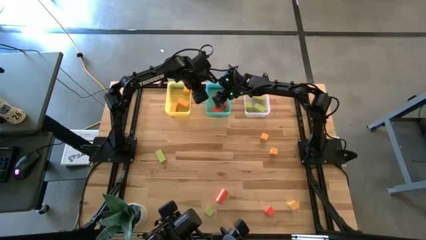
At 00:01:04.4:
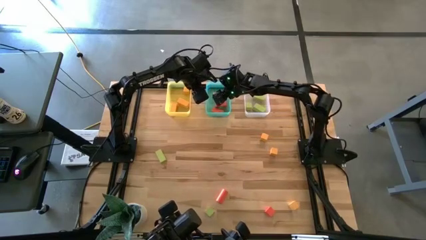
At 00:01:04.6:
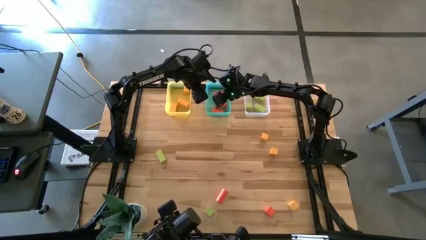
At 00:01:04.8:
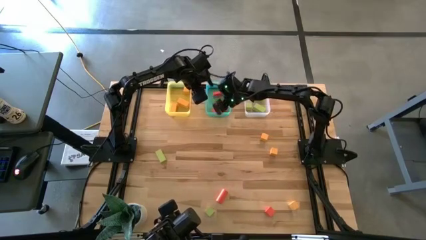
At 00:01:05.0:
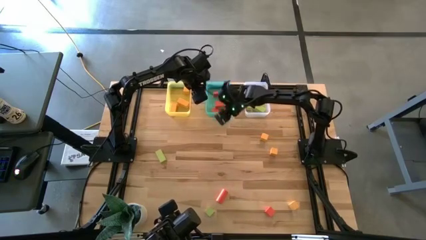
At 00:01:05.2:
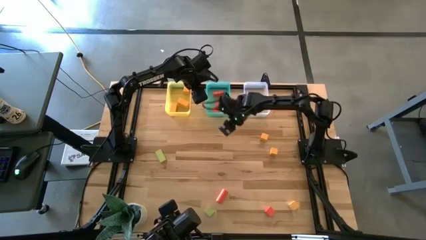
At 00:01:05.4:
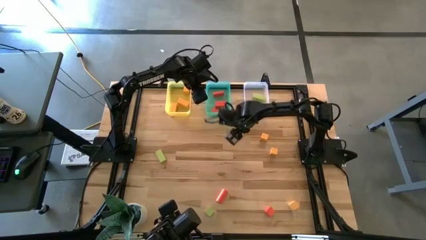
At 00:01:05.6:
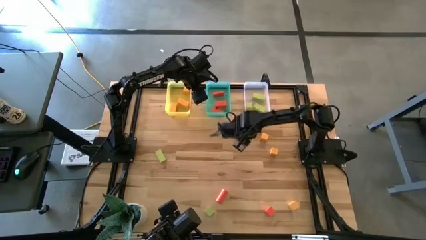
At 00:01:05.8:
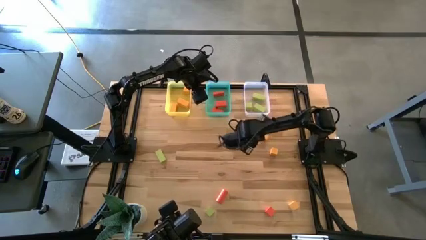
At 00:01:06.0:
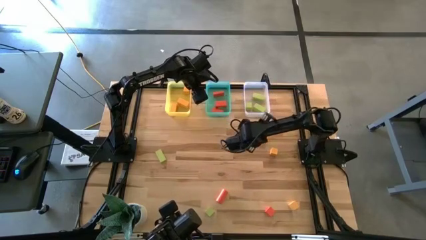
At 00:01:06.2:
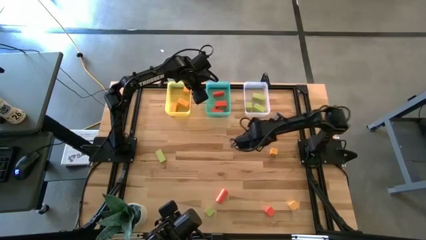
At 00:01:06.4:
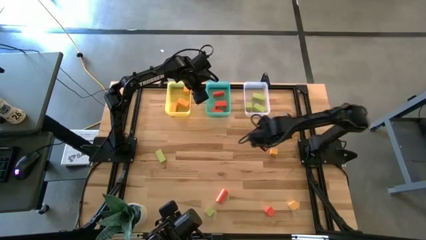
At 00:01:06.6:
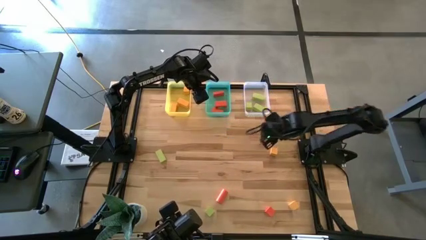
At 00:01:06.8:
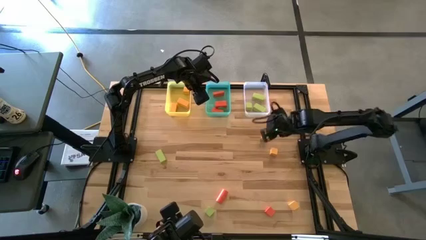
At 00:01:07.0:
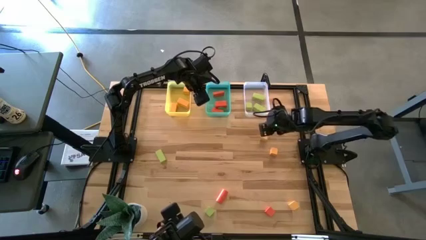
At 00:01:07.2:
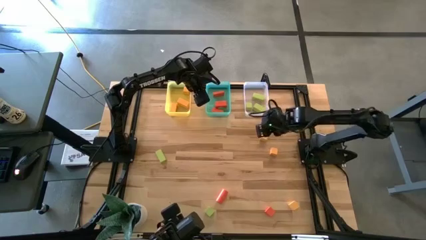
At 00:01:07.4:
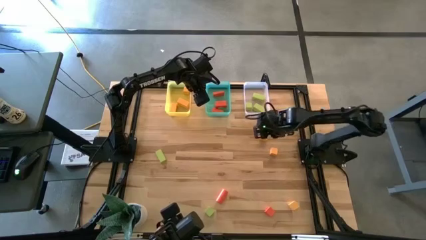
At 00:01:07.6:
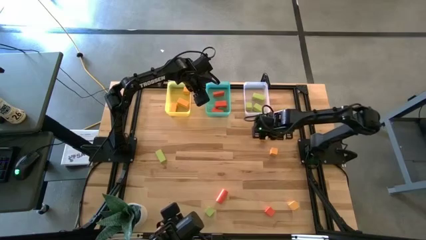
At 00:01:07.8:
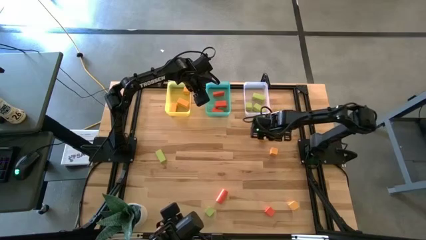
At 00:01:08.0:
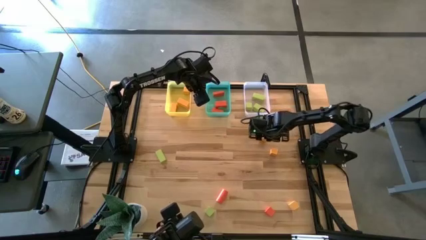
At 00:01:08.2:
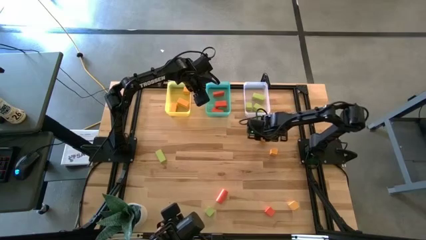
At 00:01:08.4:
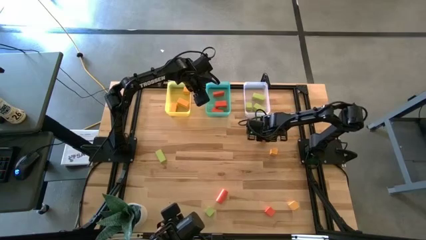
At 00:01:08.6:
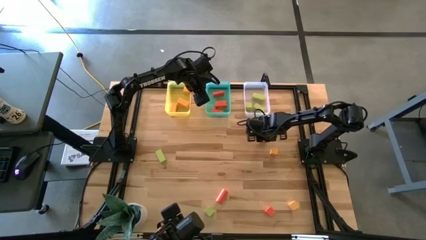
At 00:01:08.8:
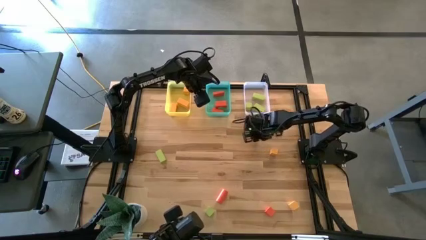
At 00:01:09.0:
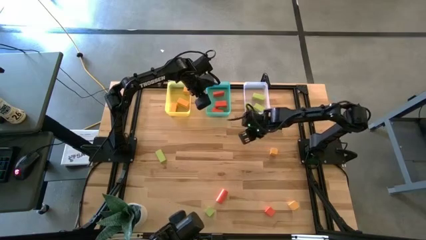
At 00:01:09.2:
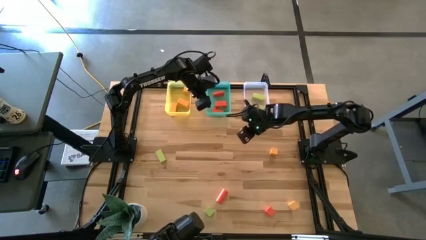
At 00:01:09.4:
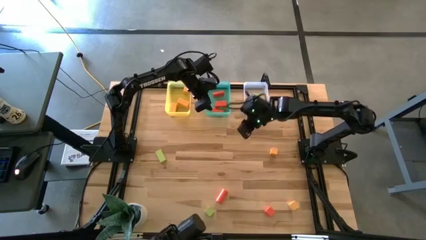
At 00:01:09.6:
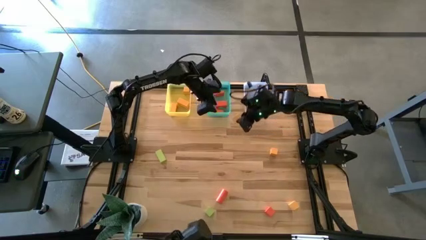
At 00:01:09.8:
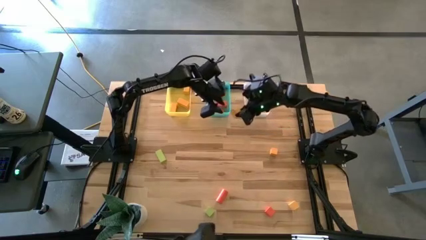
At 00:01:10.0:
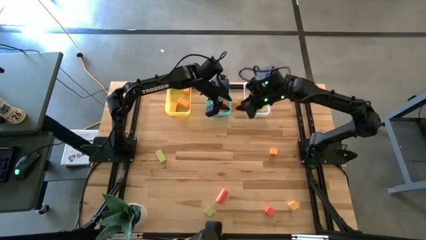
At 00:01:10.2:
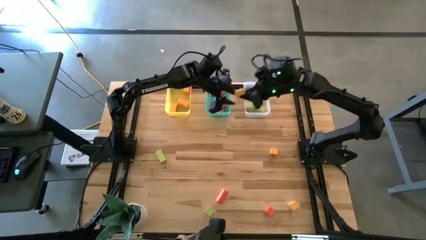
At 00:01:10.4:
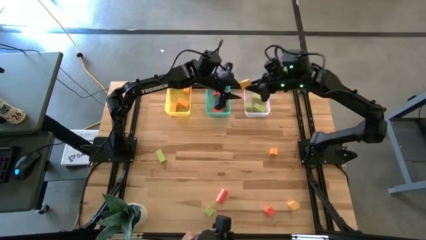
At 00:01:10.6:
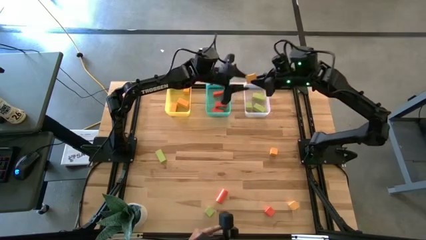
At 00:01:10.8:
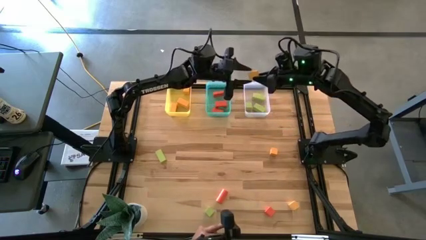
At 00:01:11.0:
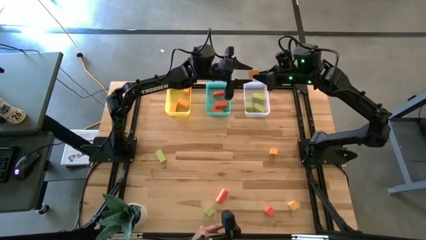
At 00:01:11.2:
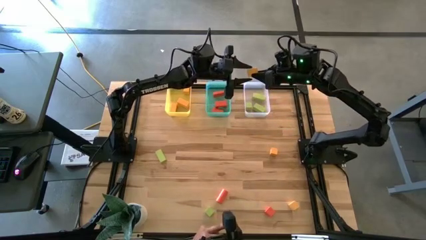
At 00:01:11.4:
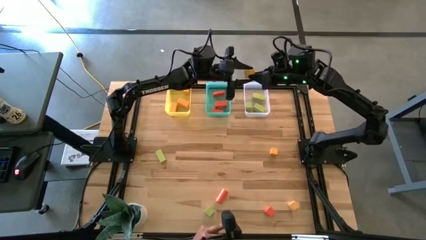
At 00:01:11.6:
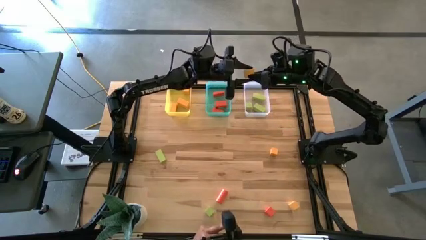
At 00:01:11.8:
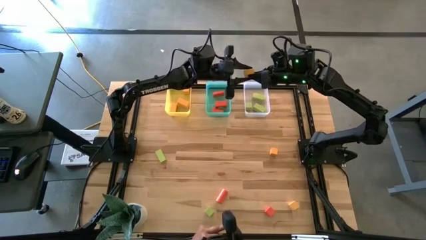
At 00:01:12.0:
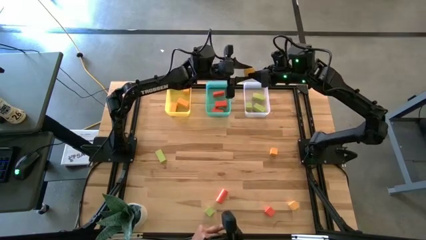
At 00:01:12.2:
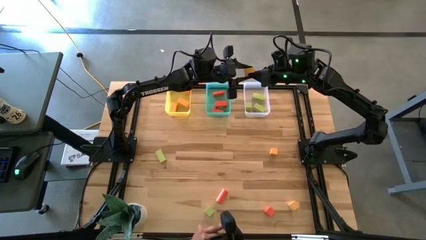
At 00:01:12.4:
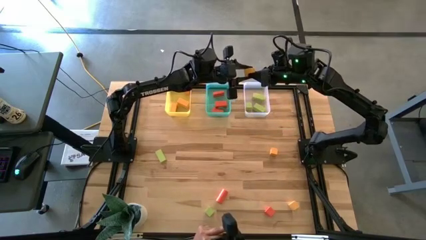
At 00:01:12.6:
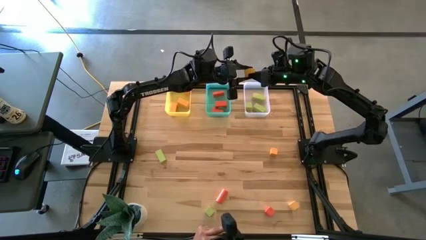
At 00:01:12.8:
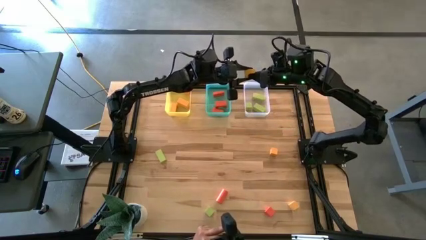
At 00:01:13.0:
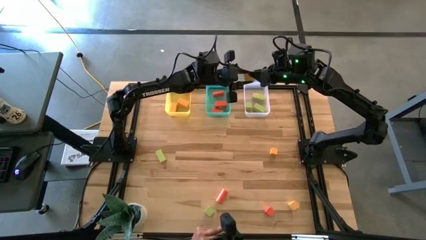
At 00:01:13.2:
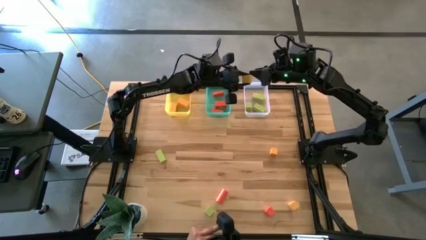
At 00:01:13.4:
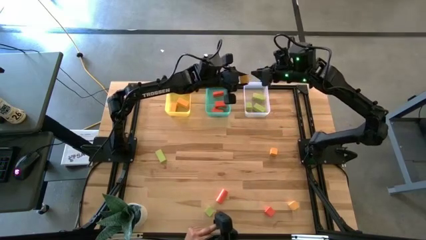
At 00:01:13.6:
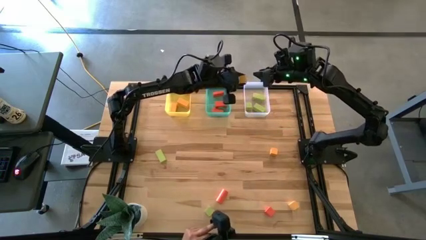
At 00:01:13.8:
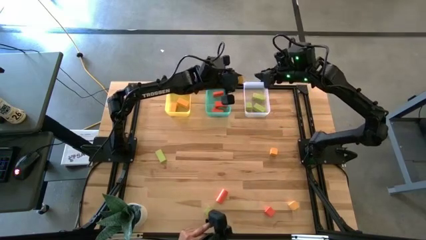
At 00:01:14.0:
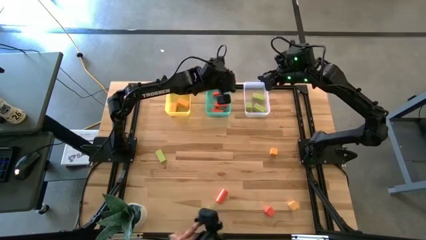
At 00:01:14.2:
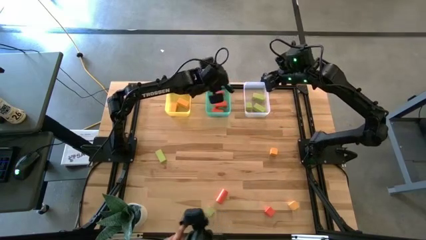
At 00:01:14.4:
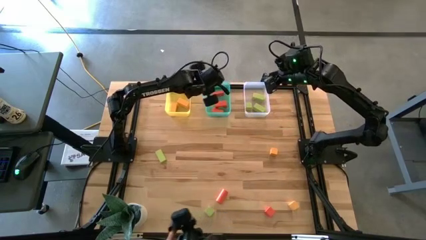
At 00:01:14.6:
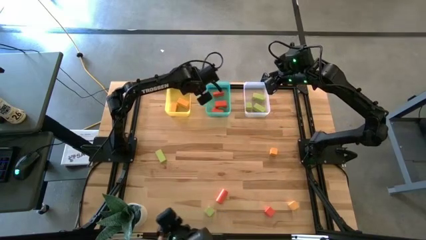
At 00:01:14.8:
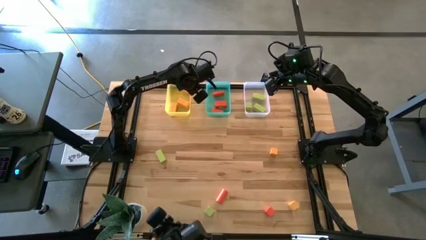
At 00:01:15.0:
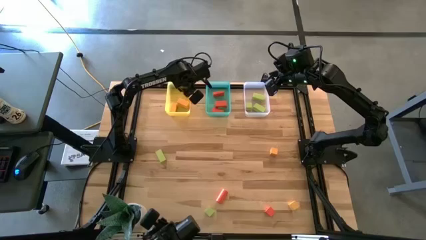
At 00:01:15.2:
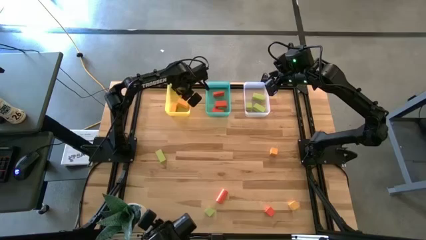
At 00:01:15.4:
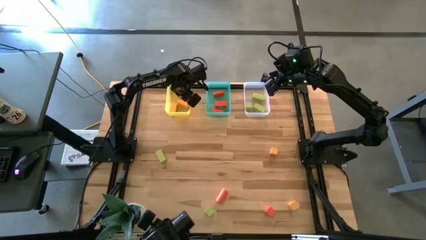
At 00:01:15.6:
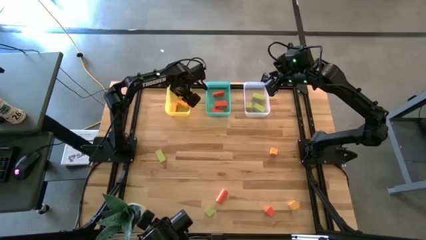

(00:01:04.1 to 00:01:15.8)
Task: Sort & place blocks by color
Put the yellow block into the yellow bin

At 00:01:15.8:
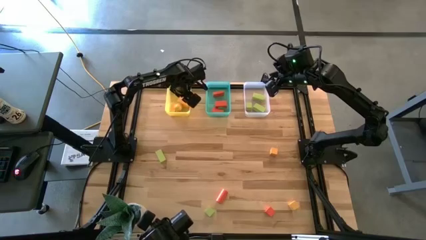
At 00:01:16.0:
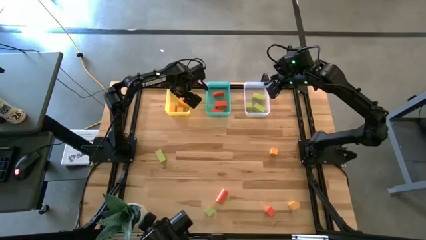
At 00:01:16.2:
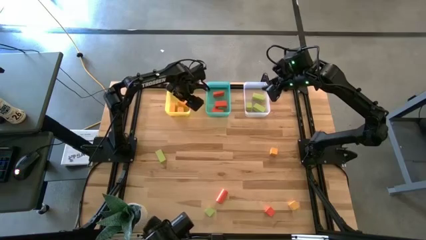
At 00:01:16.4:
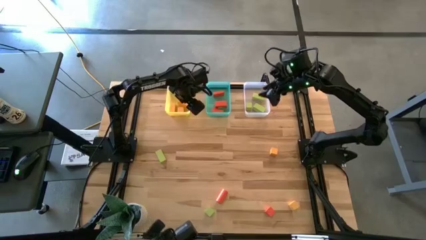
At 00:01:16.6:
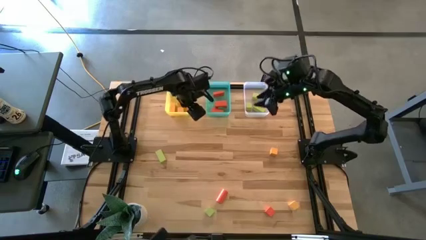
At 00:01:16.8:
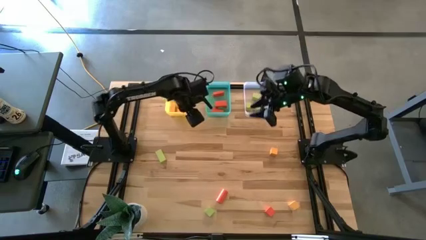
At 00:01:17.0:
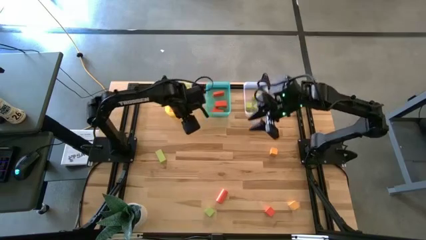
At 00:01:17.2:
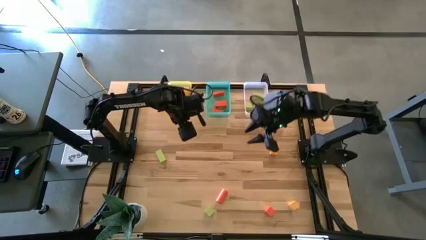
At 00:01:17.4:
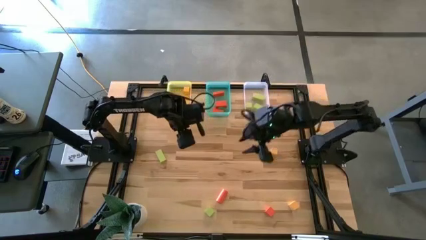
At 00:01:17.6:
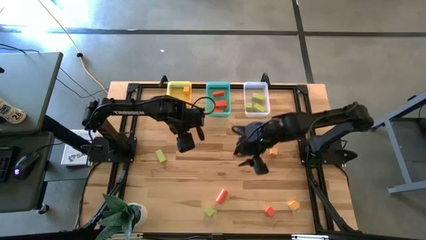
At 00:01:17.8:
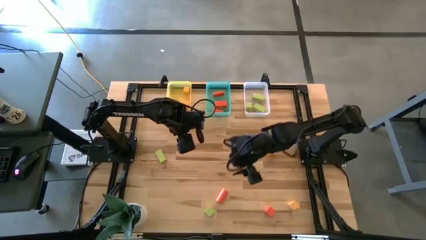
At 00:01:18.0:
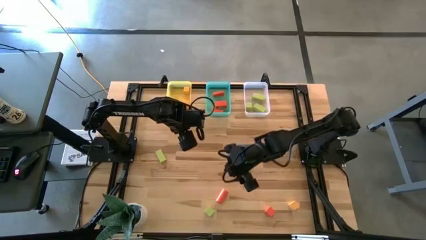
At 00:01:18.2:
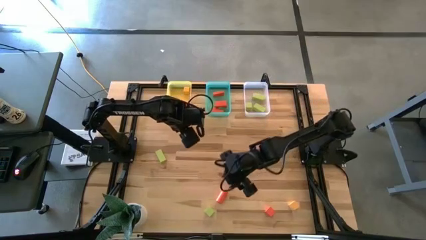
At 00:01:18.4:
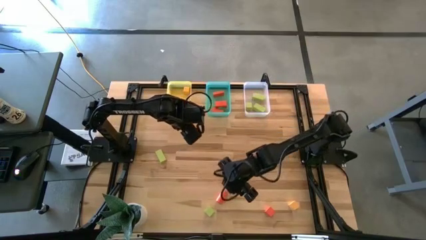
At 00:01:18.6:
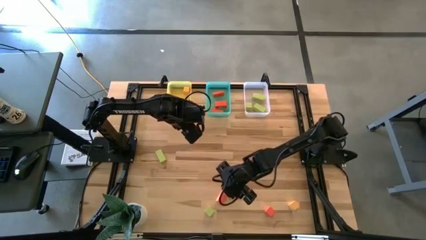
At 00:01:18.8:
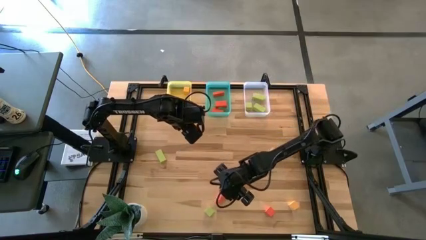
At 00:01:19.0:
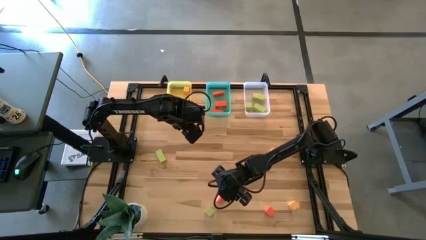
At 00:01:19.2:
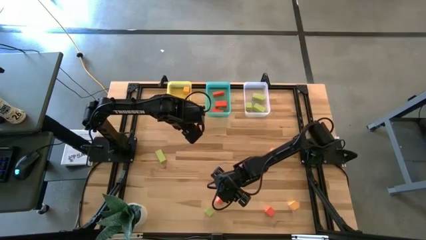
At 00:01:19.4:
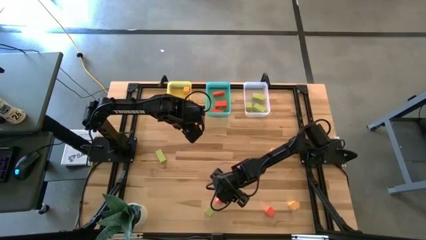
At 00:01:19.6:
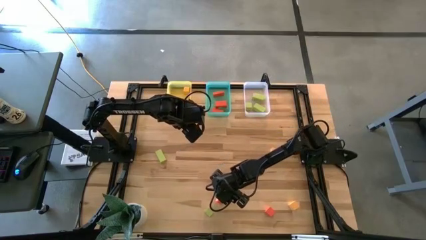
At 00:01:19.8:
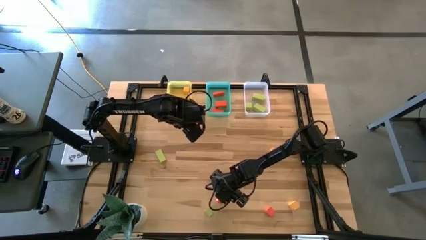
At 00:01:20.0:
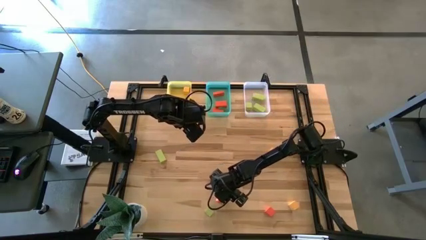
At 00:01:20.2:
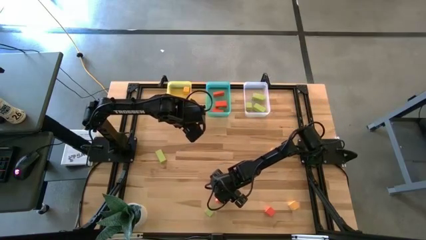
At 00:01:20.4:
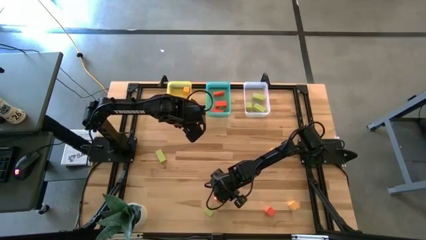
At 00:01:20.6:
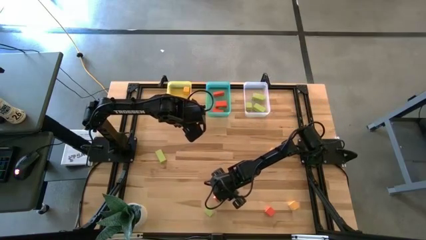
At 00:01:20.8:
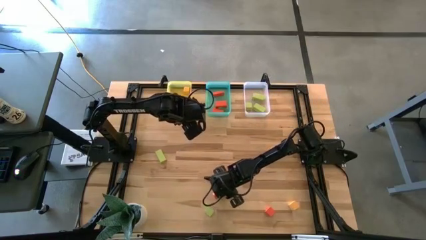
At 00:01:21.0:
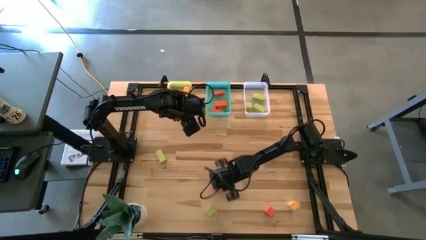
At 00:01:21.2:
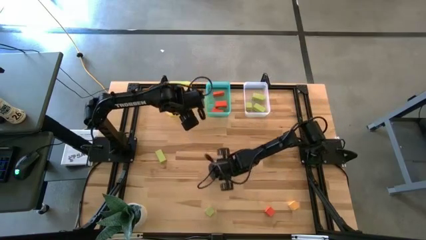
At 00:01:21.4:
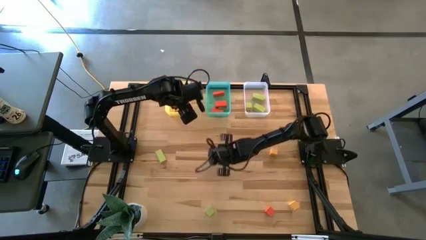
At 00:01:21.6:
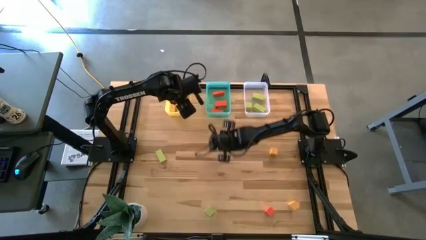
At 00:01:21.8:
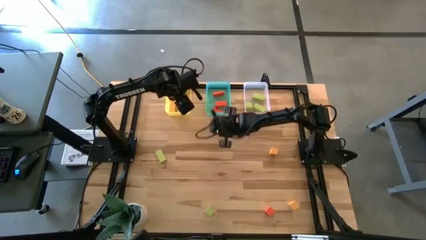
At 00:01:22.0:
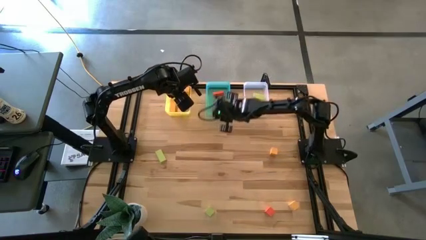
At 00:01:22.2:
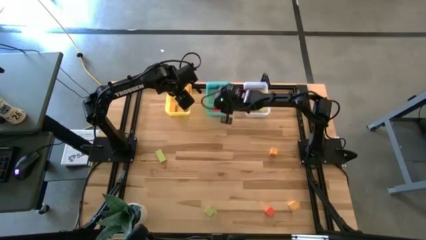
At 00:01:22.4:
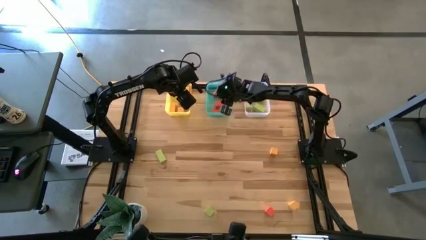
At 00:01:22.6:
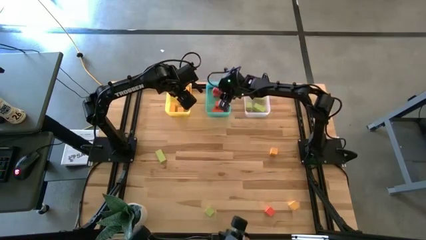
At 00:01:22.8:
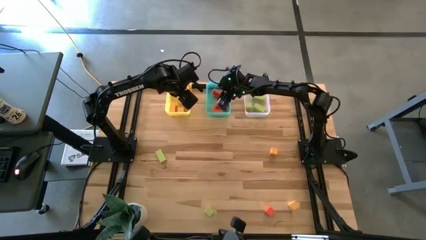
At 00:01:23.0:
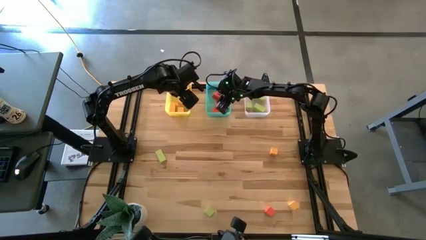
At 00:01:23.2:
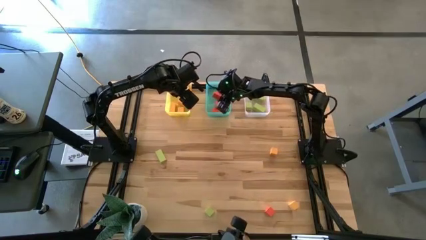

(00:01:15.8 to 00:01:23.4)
Put the orange block into the green bin
